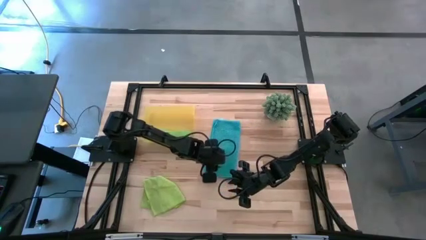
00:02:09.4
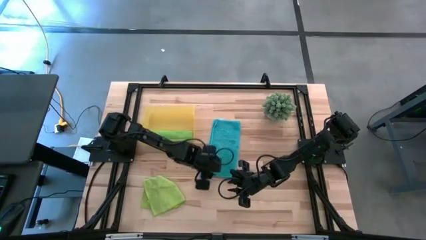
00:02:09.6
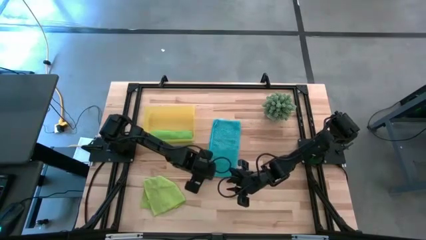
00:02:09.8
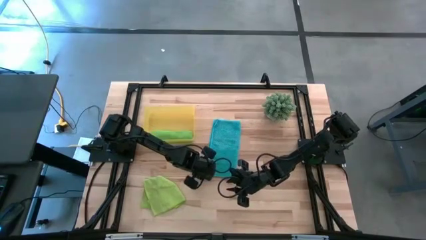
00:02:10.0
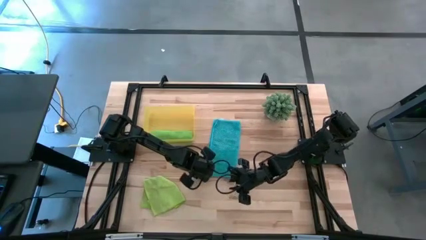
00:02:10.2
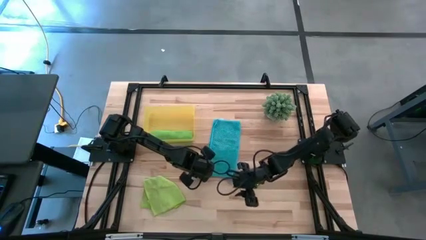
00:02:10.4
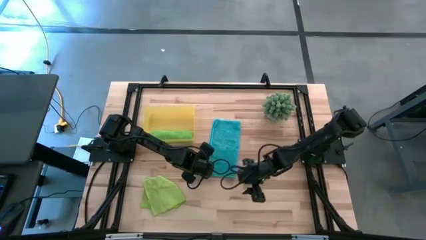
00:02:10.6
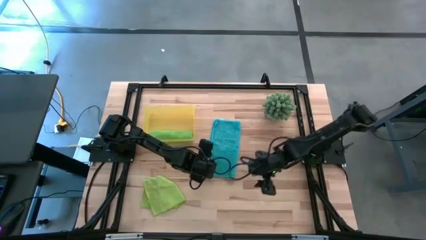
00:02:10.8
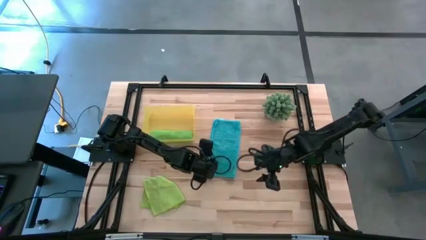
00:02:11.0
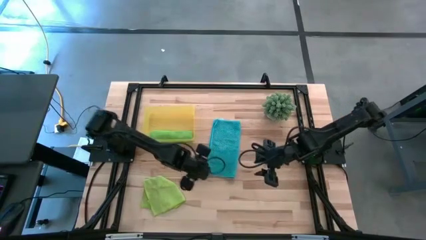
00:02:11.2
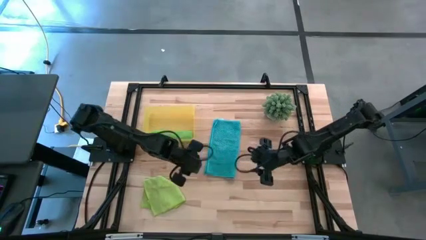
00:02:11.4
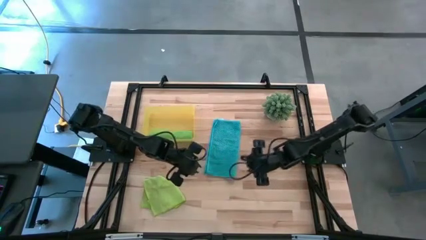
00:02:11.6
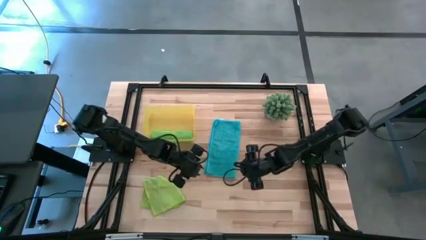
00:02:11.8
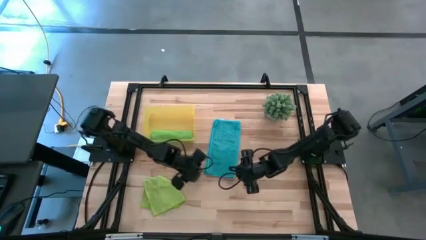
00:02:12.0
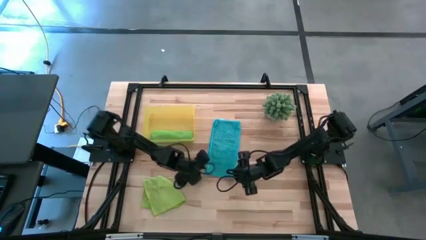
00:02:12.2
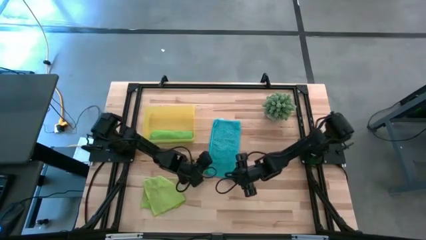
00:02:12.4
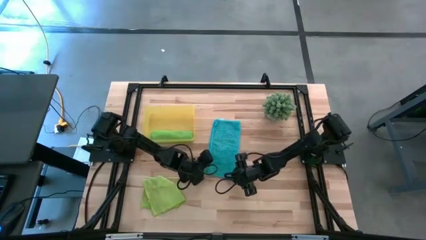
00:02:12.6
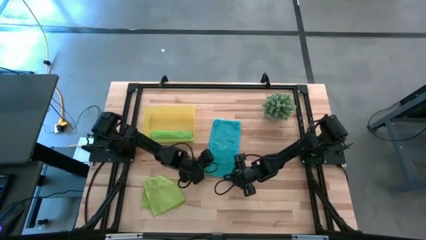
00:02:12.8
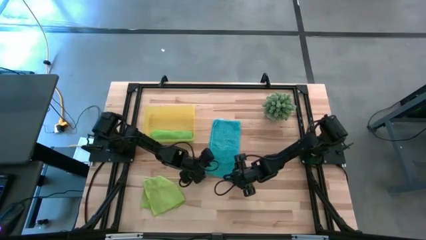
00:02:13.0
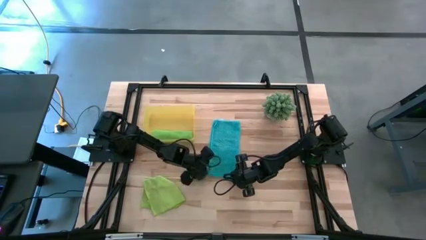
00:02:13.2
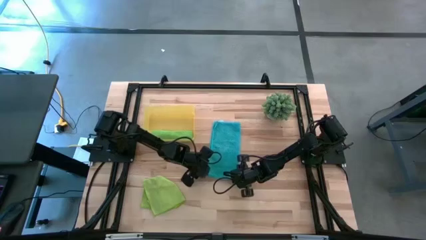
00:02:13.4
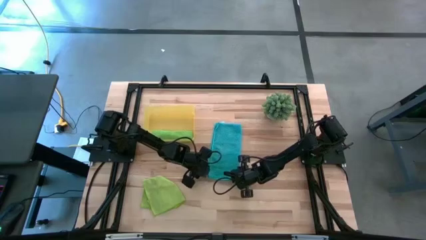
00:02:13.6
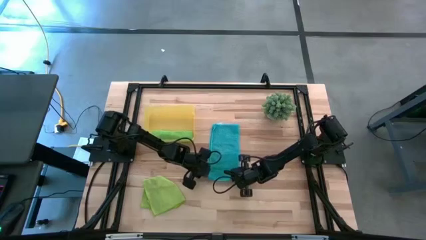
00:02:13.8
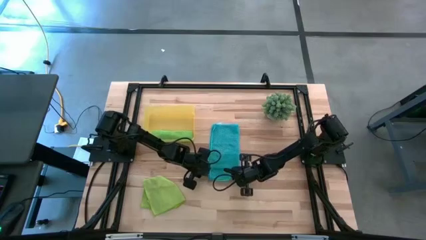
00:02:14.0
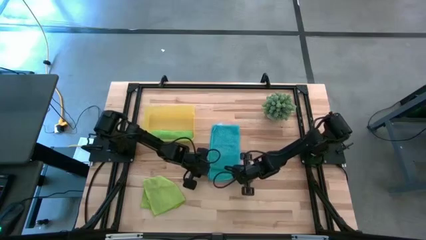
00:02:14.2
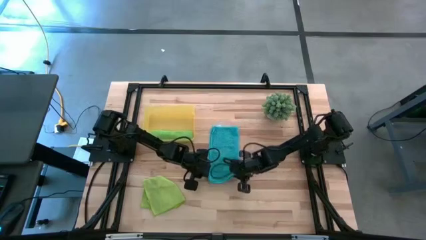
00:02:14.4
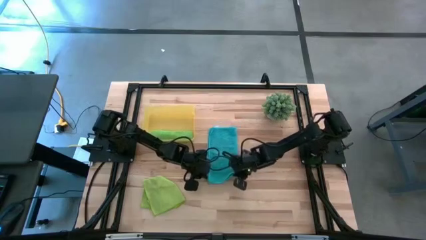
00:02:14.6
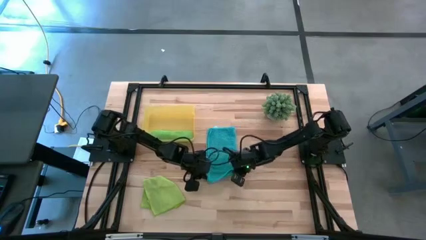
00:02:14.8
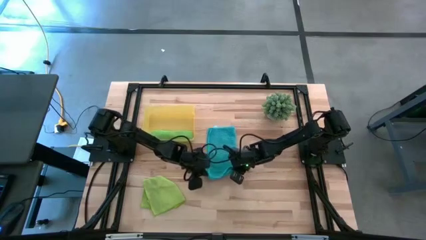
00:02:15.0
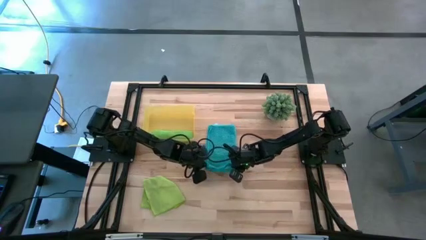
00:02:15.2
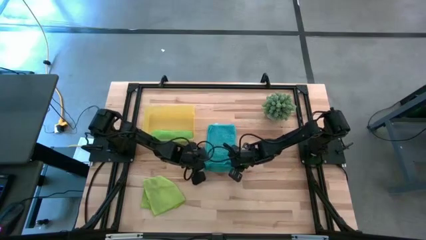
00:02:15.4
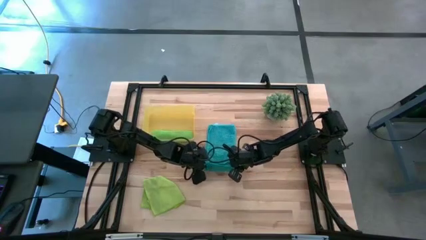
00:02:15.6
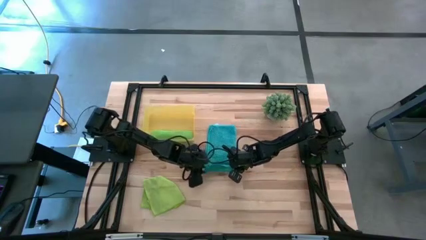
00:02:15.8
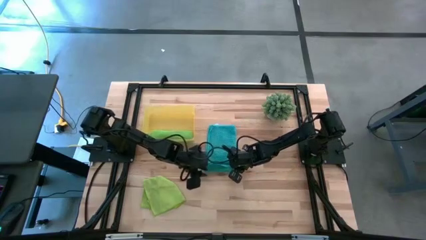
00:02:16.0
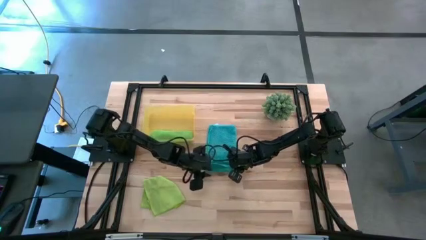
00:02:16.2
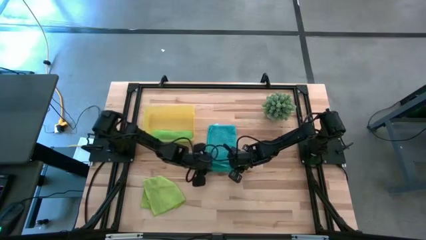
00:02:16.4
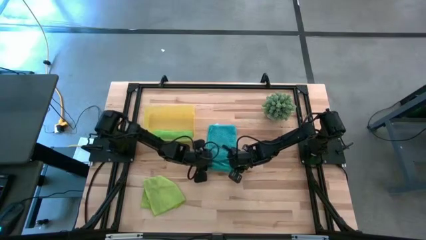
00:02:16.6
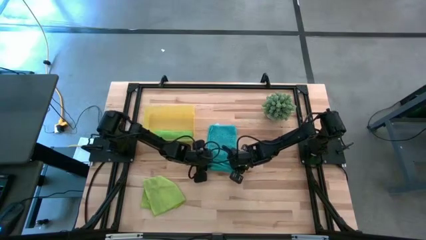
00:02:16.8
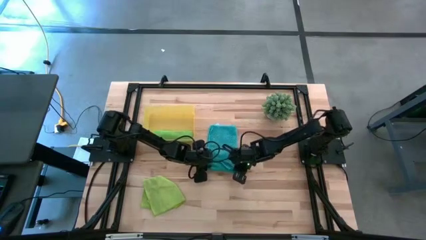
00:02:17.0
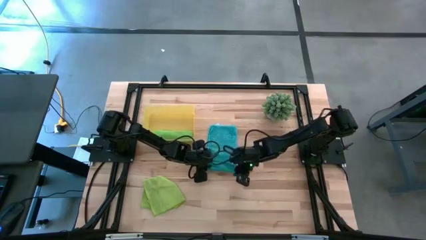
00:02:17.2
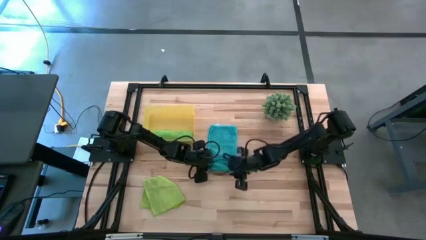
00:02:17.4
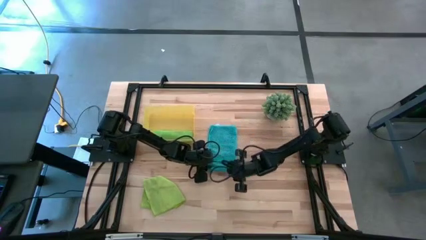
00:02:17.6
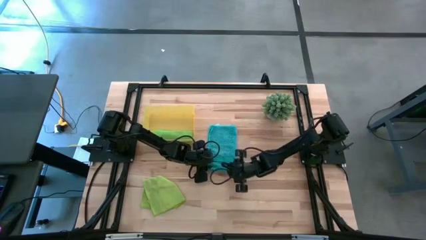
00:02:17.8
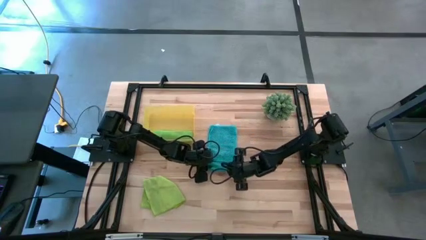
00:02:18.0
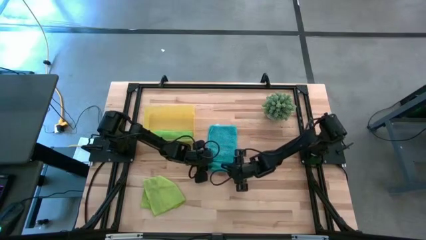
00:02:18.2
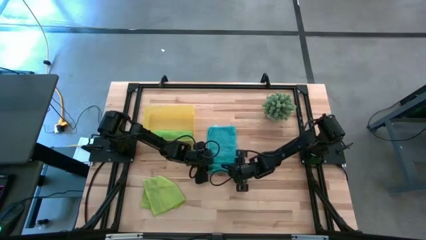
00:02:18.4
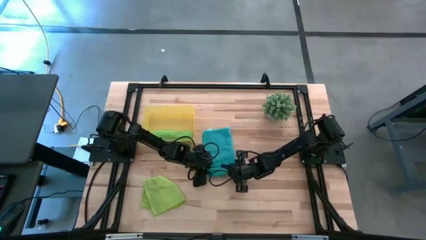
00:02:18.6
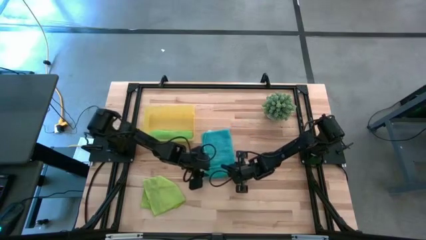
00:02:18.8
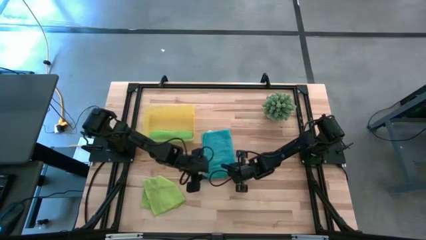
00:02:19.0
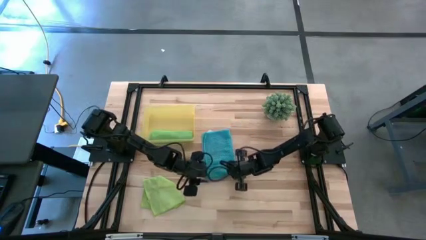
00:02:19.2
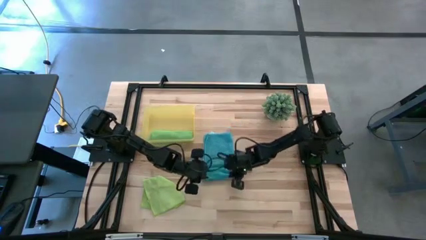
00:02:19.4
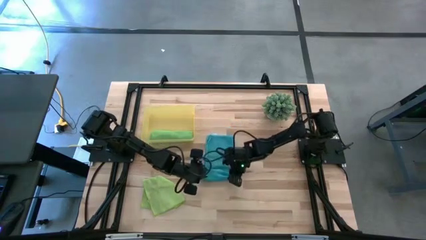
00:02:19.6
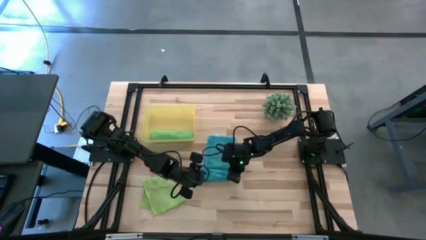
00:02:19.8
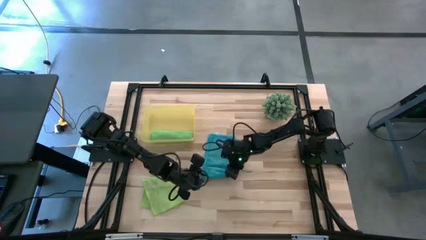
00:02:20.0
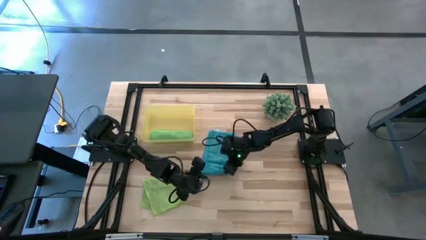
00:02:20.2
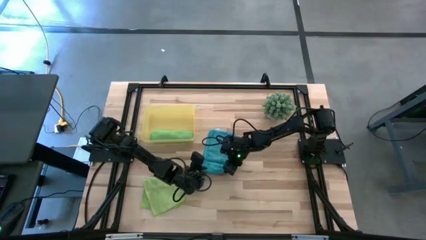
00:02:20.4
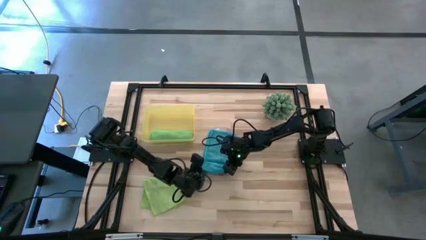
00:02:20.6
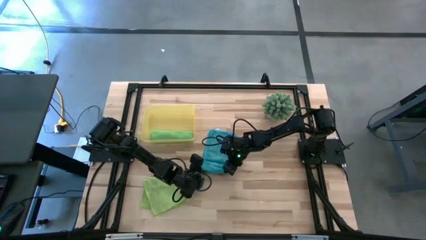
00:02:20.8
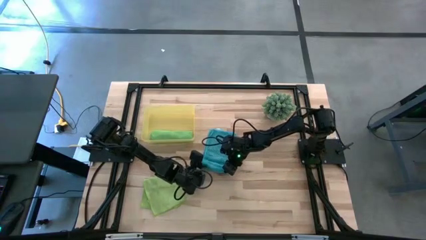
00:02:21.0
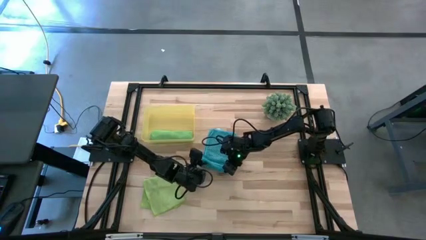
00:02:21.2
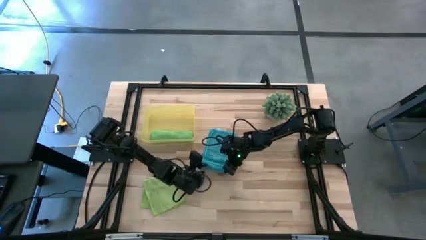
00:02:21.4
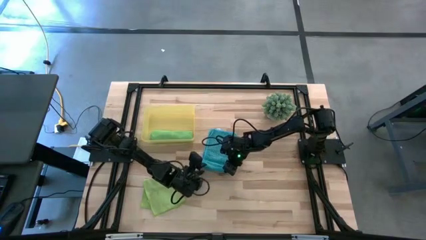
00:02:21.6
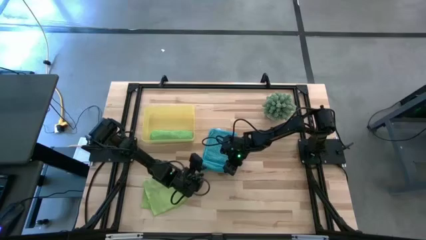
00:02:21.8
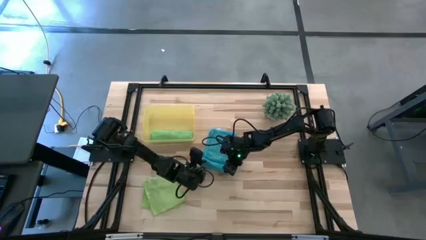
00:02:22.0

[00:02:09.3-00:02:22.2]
Task: Roll microfiber towels into tight, uniform cylinder then place into a basket
Roll the blue microfiber towel

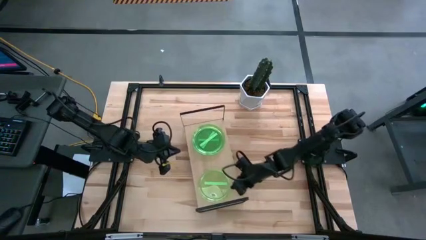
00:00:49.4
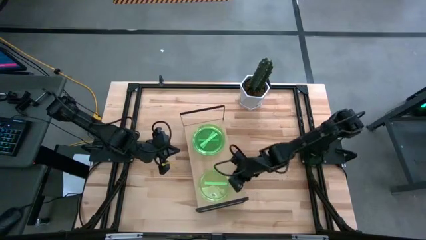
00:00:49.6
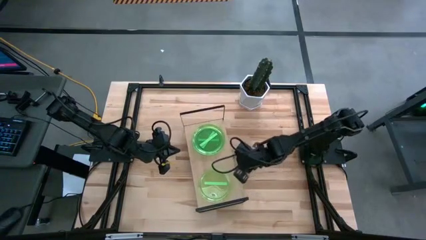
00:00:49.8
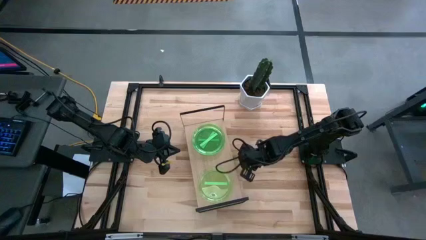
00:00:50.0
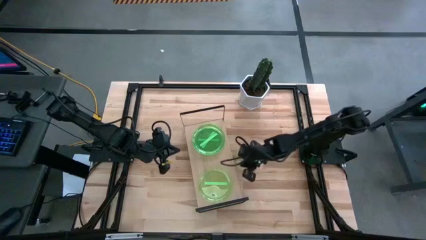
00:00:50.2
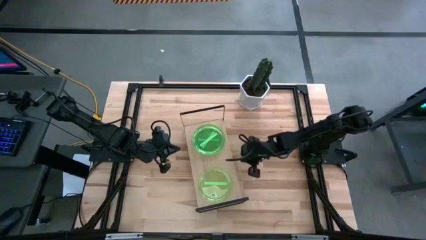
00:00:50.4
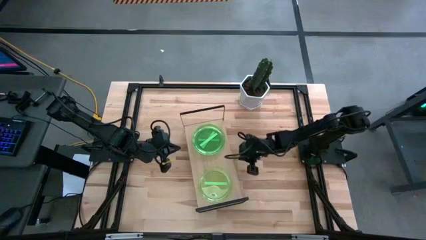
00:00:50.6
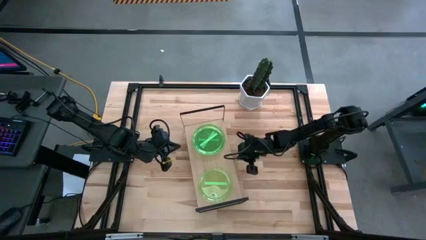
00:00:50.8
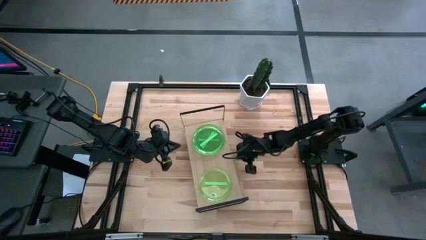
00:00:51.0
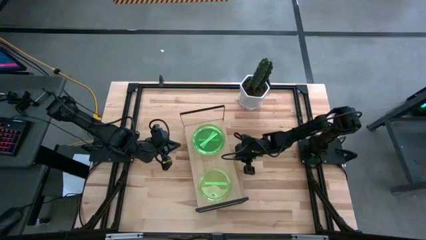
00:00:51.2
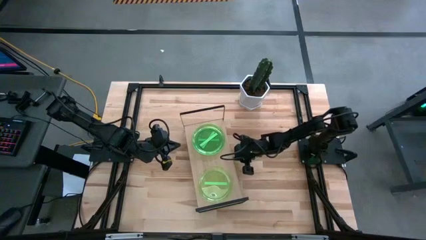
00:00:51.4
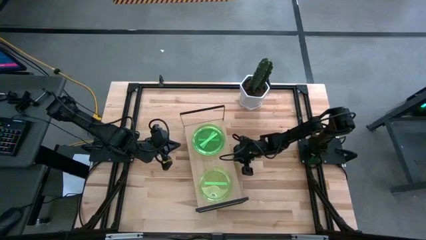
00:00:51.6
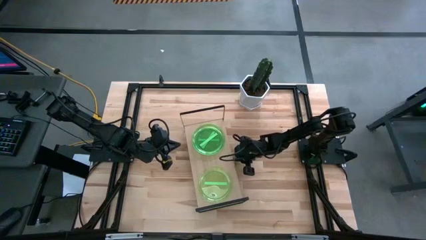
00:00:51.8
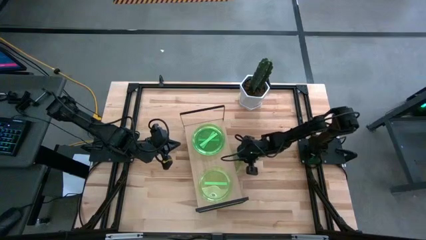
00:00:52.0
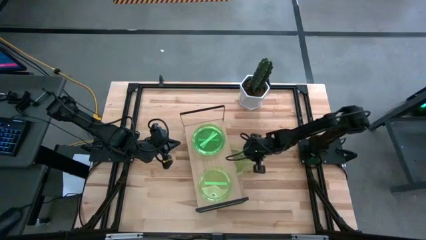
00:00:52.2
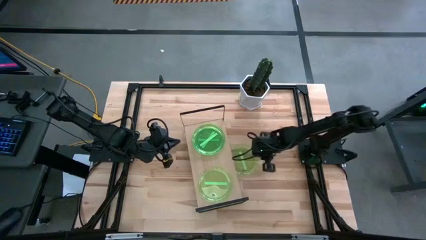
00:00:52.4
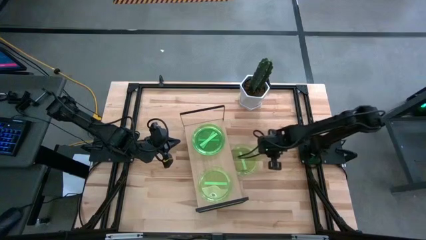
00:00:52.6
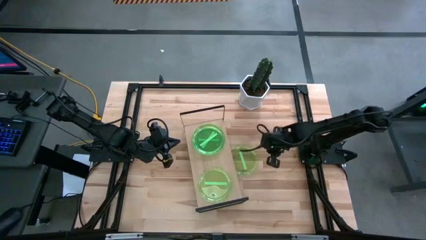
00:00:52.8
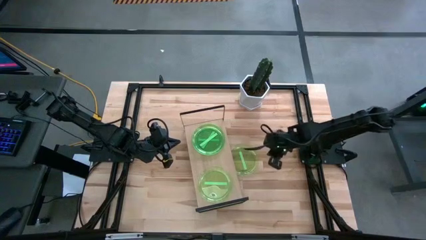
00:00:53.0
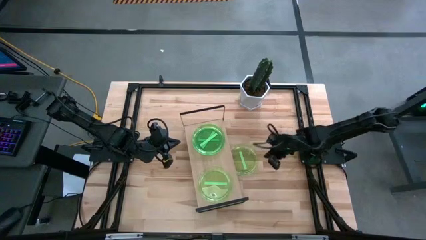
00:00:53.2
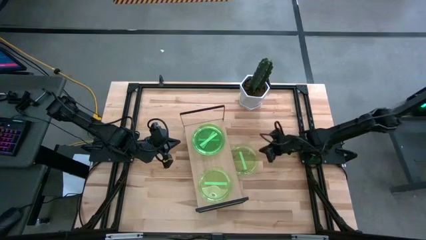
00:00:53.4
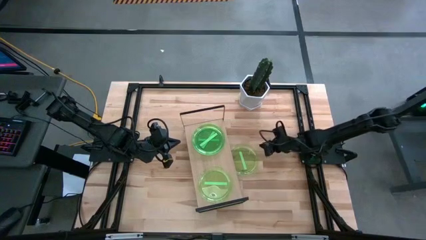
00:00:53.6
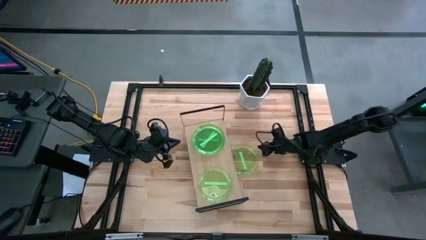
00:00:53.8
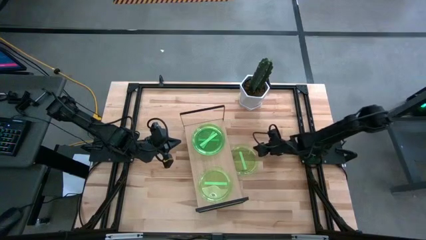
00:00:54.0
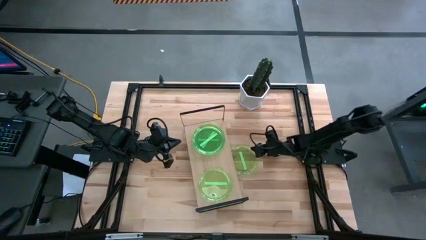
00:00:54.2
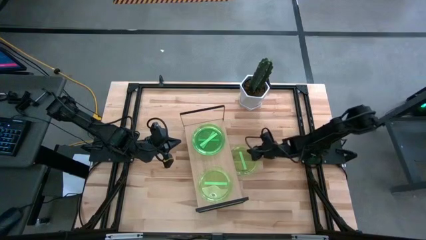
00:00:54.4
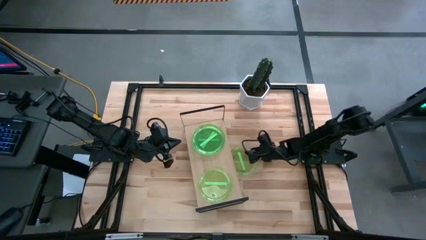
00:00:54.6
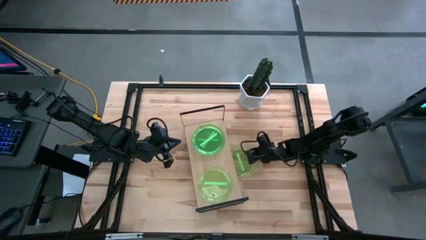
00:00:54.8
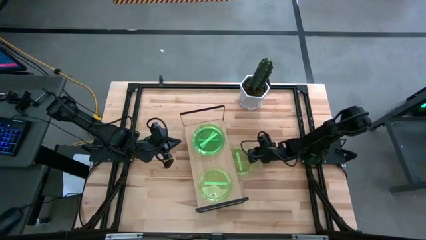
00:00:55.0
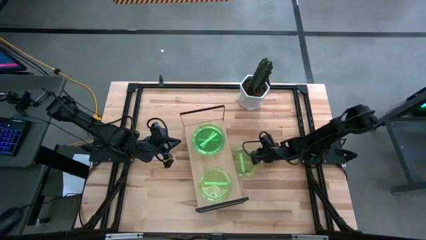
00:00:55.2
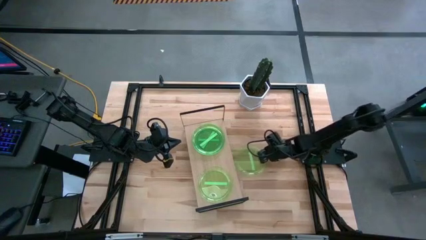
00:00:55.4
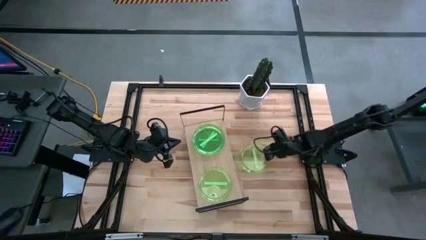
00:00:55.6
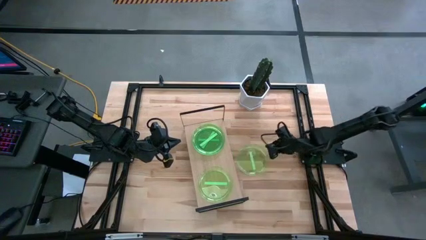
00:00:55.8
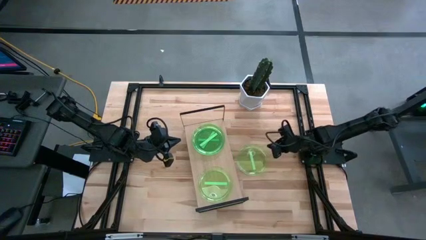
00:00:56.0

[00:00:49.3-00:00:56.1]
Task: Place and stack plates onto a shelf
Stack the green plate on top of the bottom green plate on the shelf
